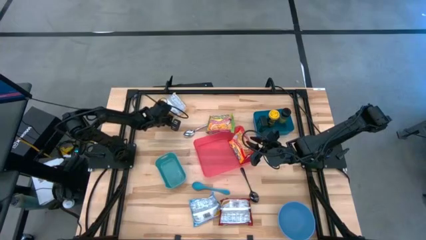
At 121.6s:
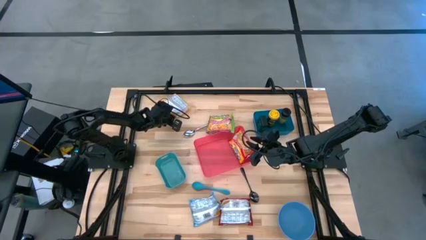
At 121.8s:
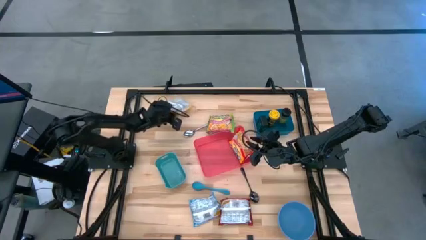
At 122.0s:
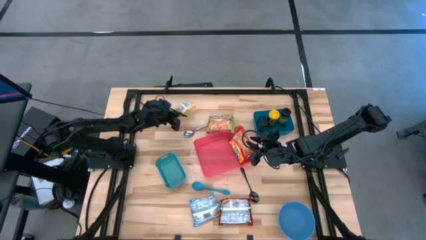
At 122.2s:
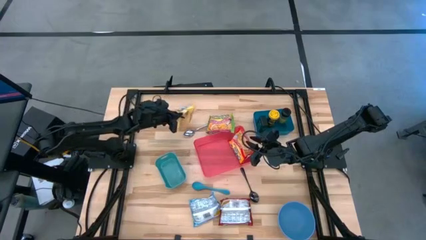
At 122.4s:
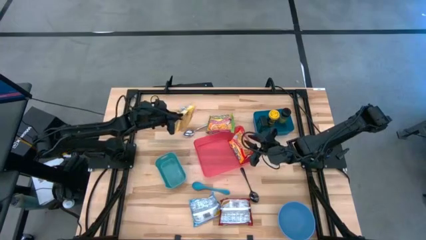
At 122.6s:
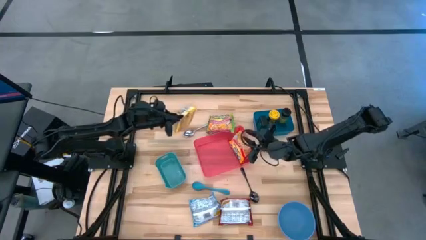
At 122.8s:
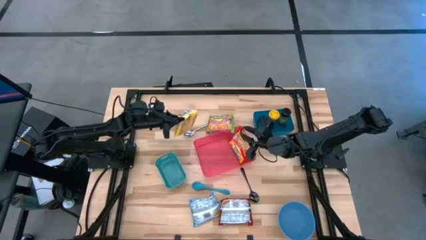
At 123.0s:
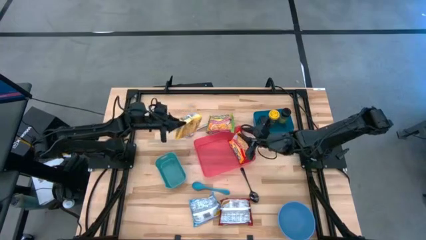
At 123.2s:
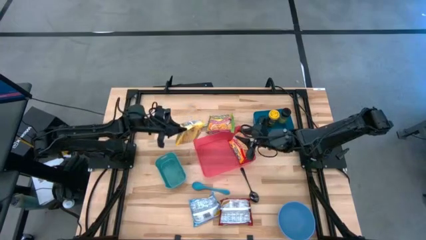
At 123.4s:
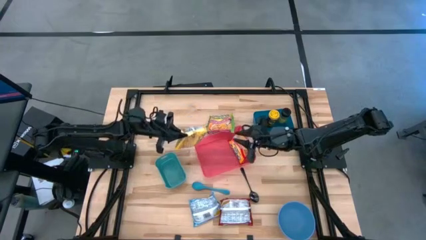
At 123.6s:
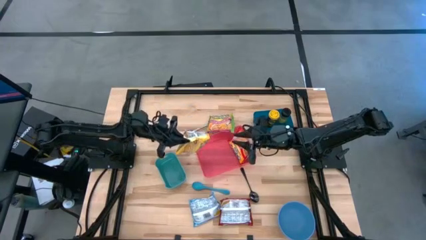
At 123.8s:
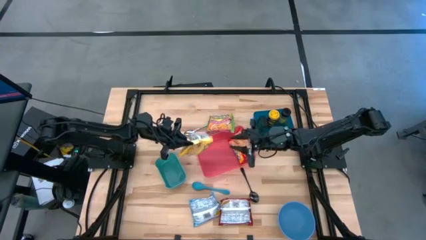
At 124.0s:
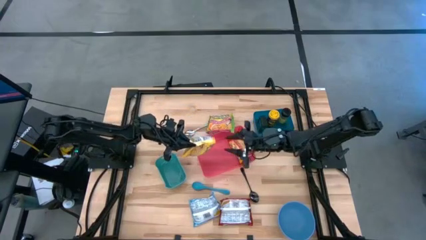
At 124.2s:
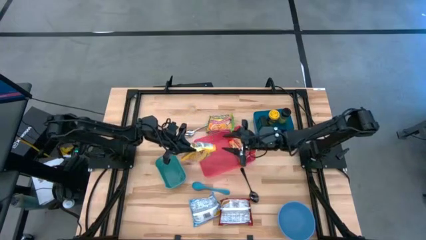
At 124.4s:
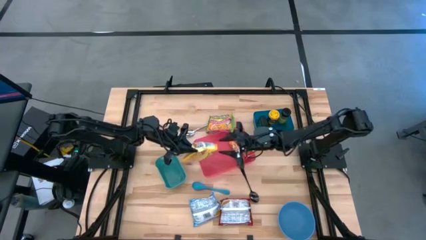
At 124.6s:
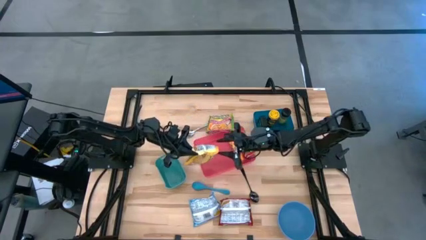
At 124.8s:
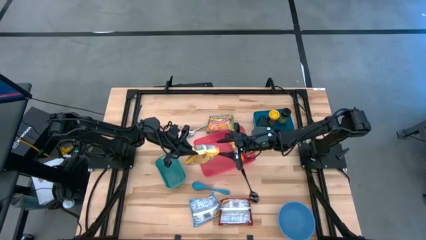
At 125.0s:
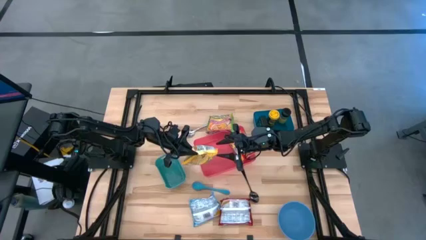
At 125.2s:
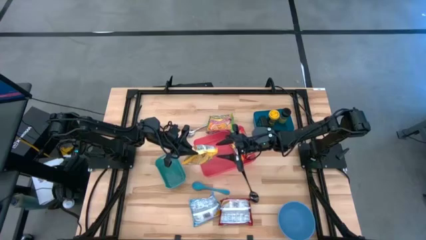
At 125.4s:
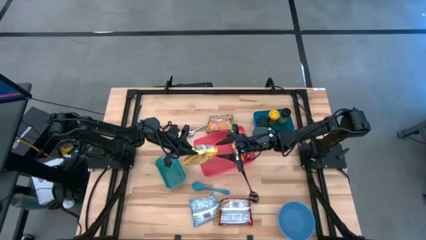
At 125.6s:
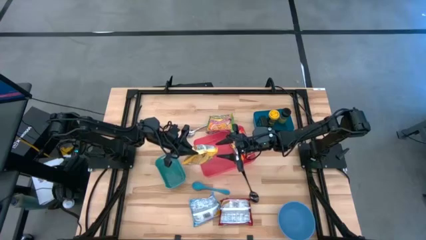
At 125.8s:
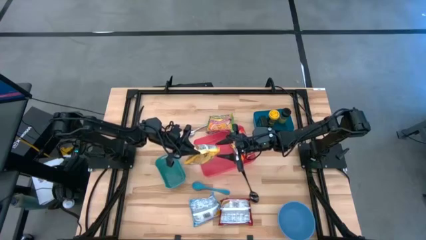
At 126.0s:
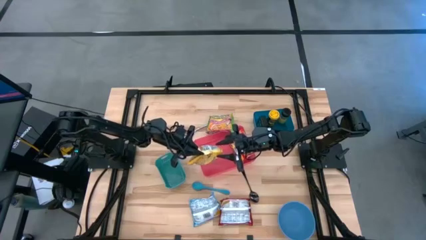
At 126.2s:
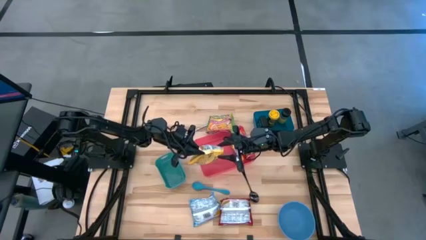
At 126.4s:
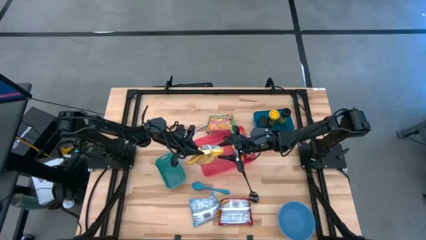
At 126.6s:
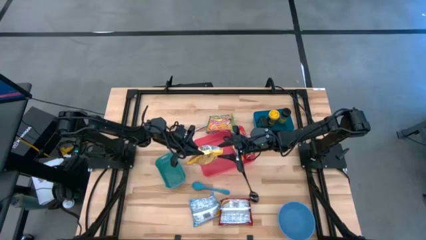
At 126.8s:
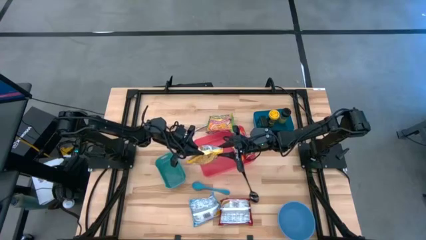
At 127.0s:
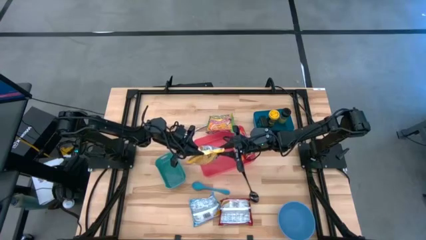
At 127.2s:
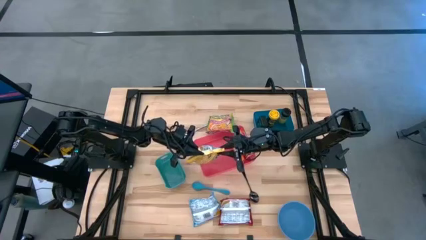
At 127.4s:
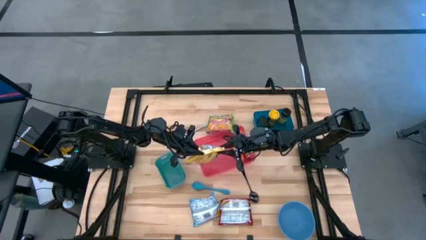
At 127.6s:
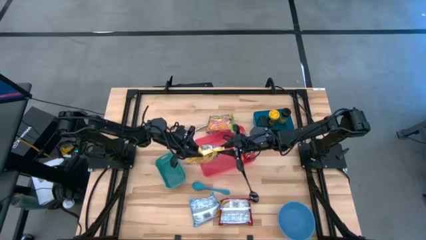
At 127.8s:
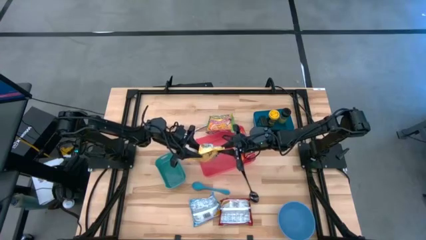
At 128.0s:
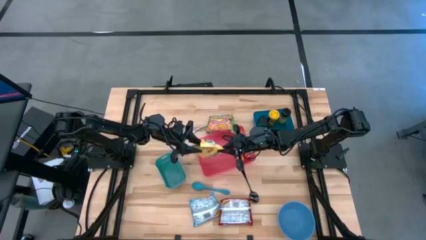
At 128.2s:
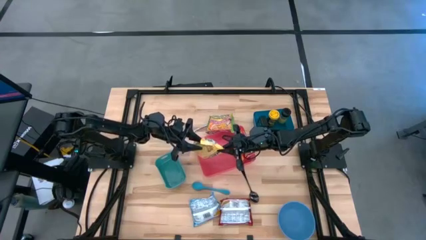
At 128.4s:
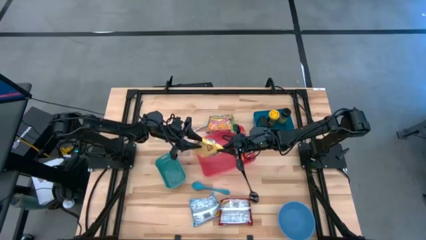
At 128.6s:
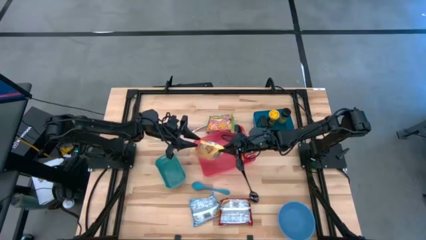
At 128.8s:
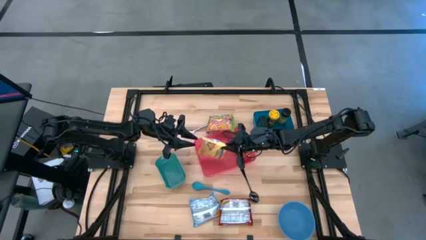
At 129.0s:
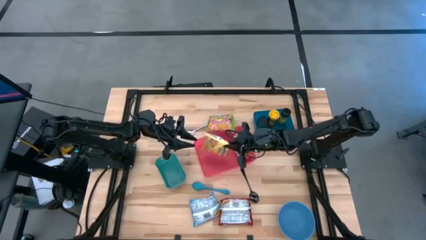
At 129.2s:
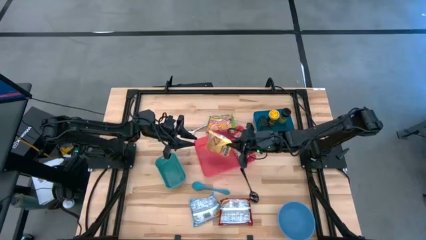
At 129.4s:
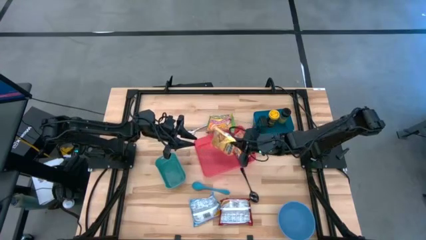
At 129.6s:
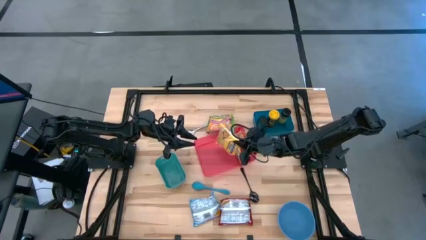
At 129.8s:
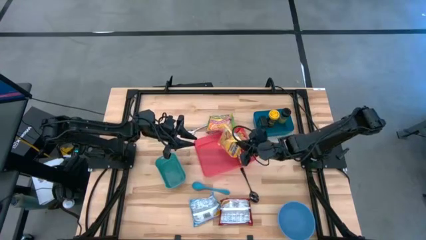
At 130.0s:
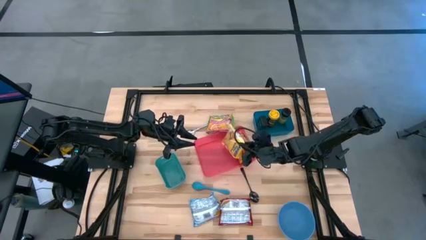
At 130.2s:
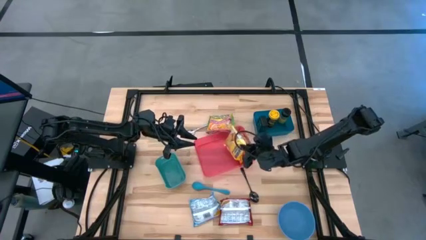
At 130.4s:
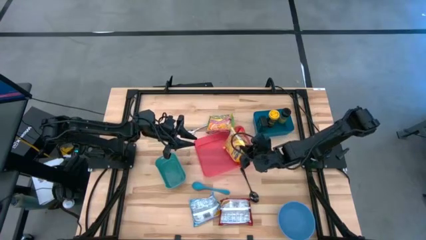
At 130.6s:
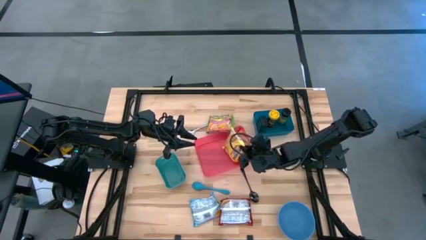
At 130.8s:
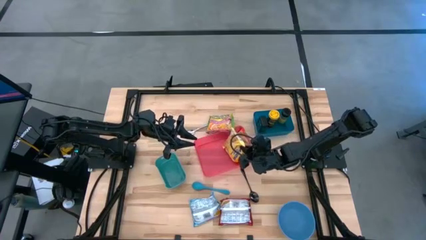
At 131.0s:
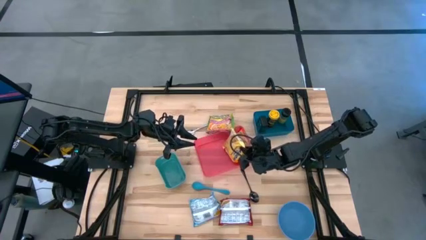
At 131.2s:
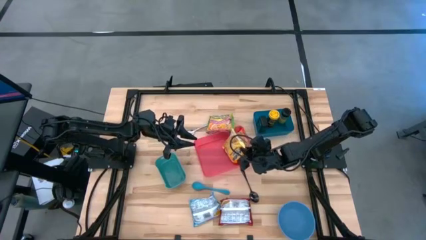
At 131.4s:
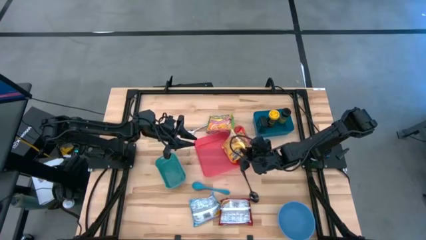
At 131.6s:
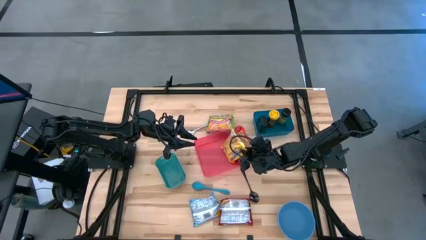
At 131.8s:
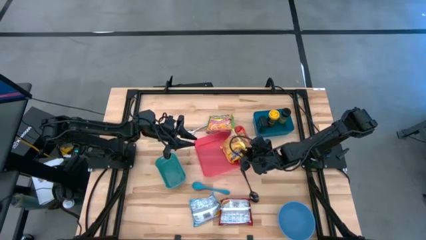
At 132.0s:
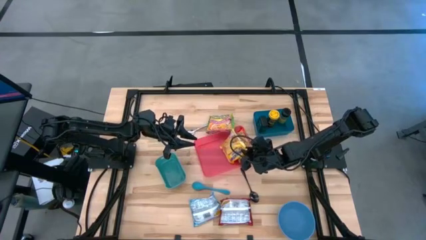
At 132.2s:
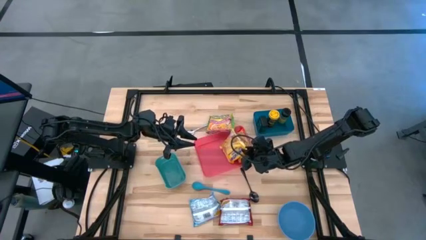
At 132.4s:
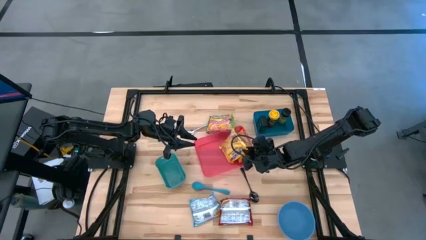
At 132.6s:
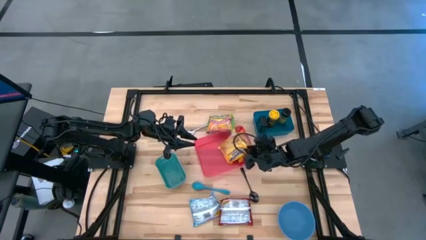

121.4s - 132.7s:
Task: Pick & Place Food Item
Put the yellow noodle pack into the red bin

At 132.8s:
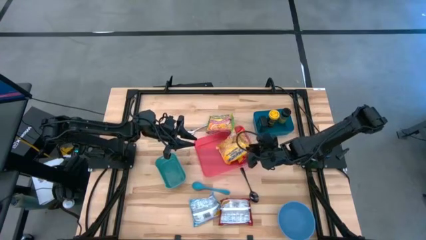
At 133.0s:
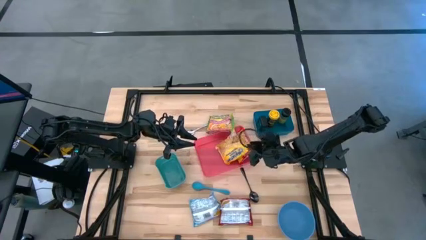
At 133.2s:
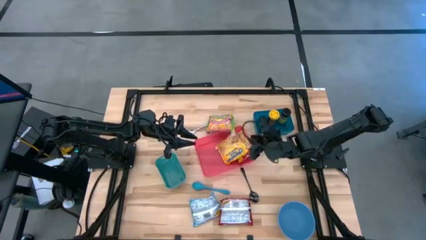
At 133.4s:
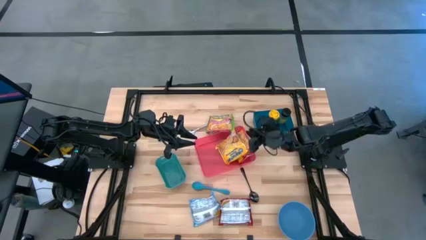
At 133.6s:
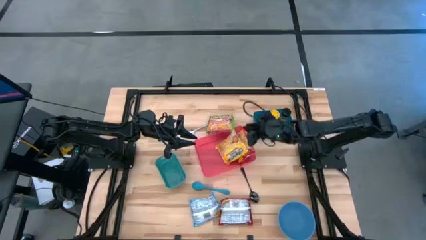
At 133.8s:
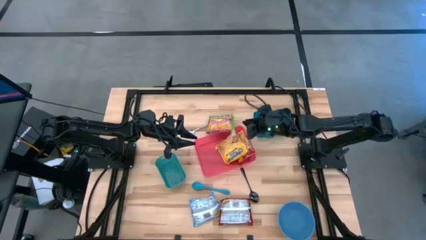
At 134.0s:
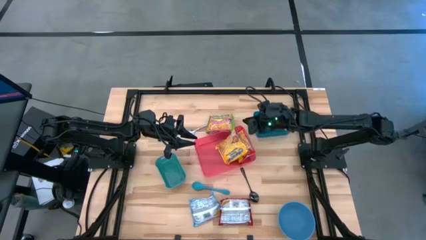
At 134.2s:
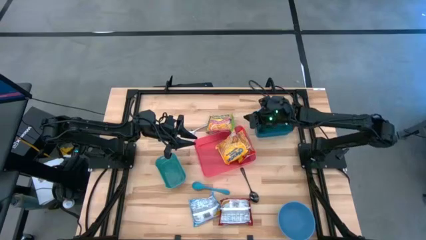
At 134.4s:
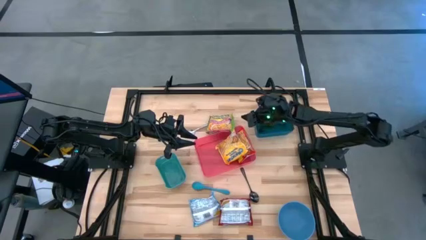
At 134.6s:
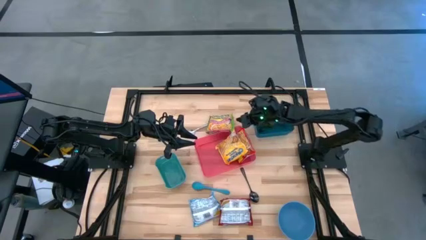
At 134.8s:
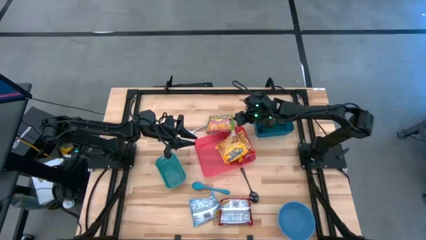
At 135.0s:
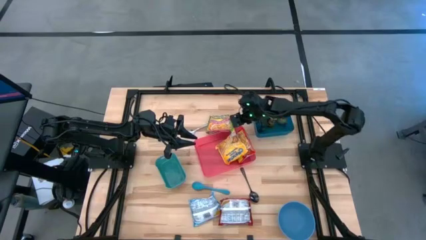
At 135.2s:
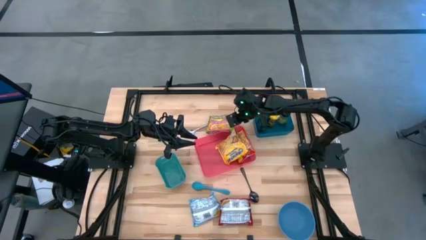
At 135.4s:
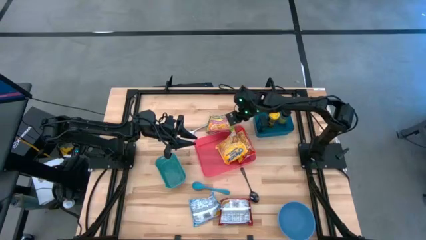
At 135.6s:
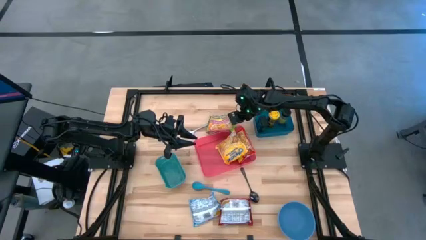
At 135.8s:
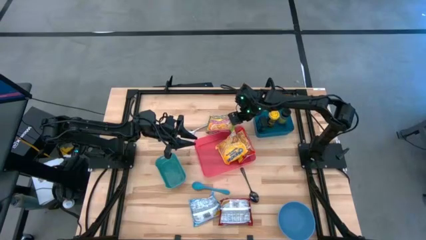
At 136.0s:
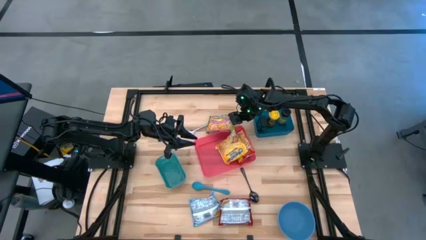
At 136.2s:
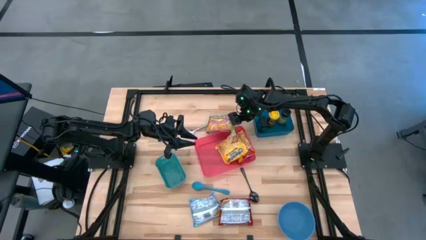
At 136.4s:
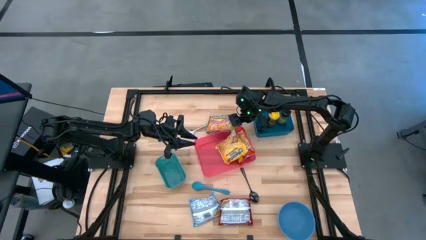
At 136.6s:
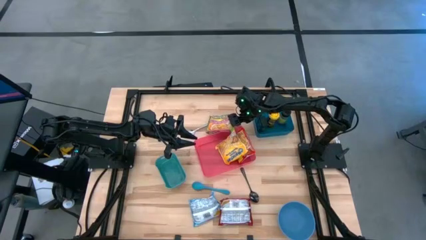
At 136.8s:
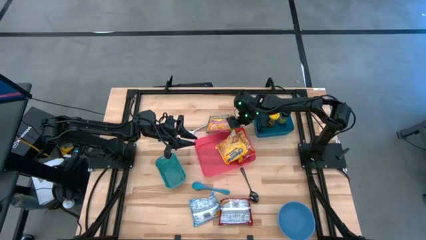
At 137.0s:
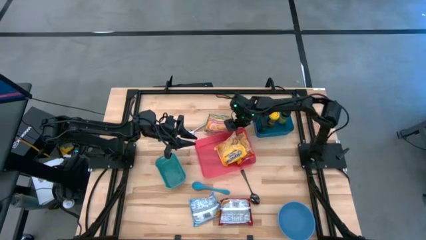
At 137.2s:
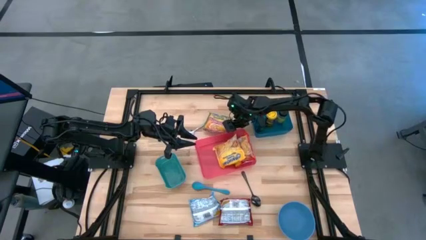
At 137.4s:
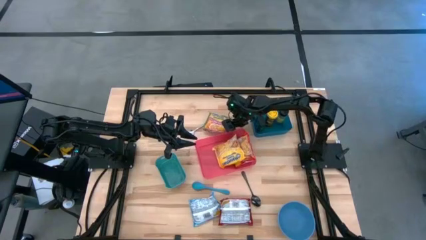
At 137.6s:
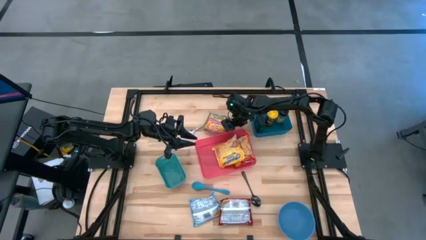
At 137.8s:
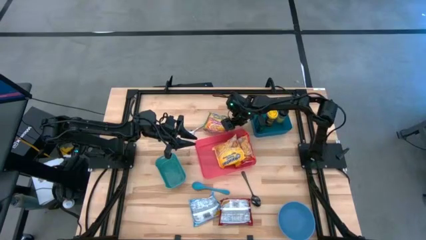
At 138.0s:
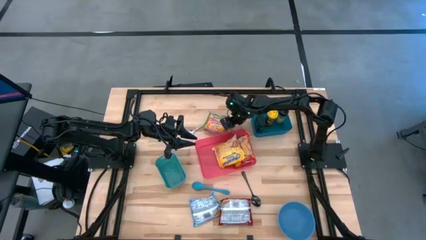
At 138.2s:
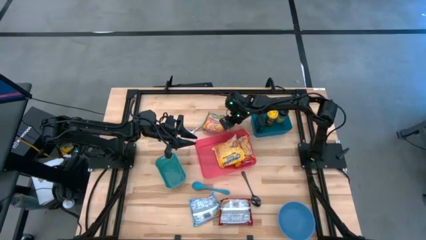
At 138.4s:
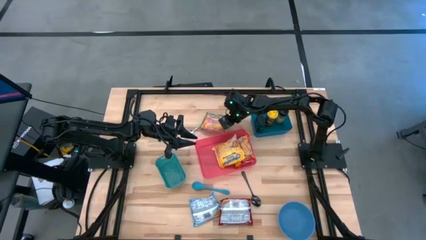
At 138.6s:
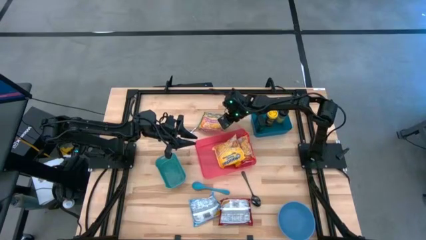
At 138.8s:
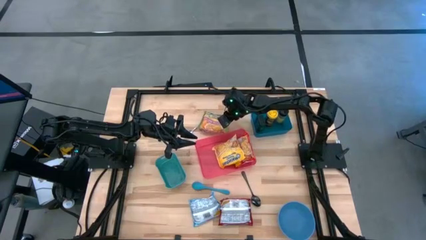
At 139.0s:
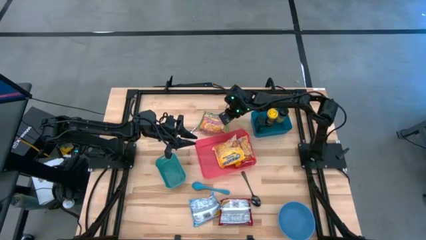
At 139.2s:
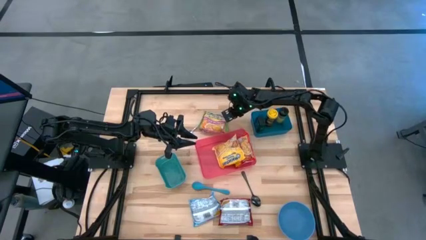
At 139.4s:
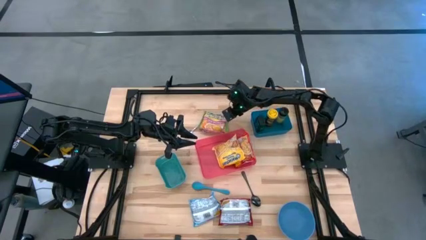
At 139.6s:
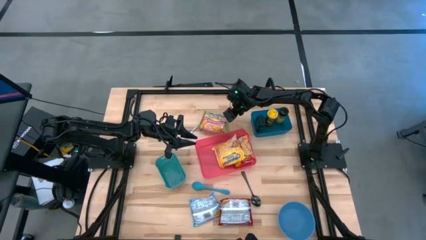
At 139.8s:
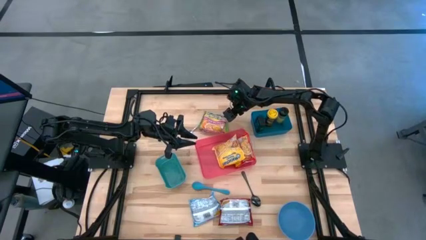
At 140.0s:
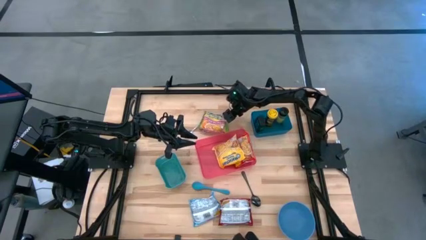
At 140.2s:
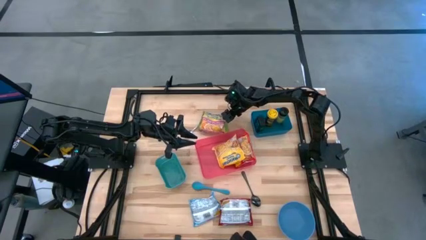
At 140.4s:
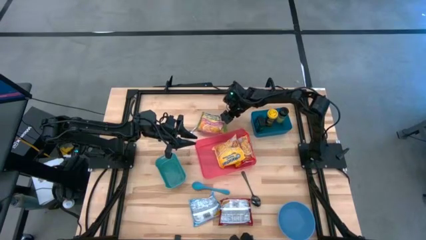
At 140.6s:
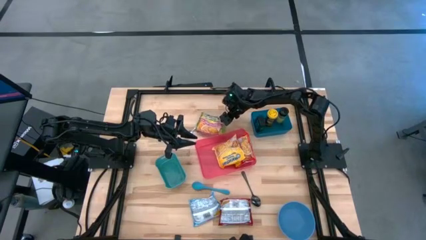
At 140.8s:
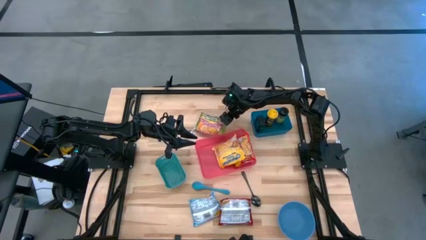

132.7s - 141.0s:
Put the green noodle pack into the red bin
